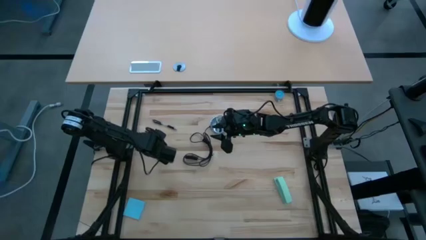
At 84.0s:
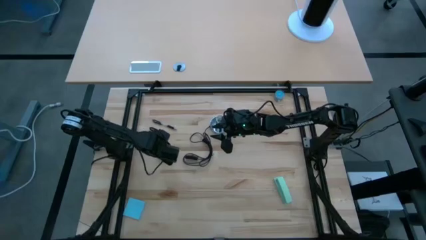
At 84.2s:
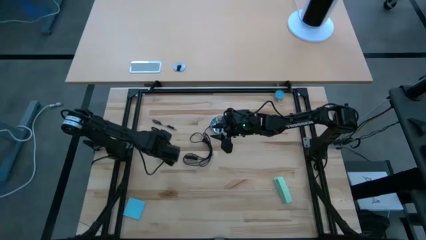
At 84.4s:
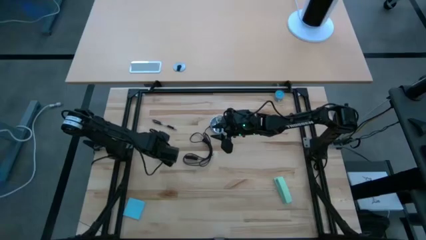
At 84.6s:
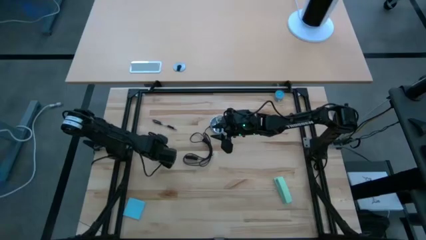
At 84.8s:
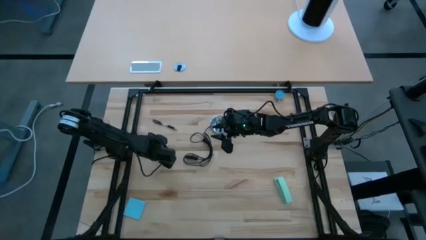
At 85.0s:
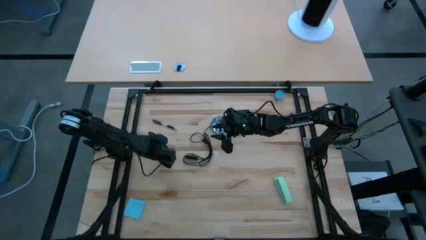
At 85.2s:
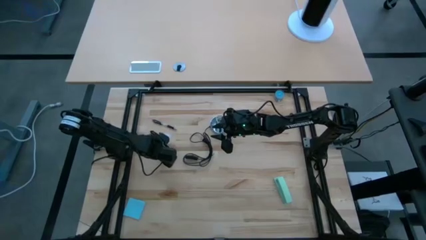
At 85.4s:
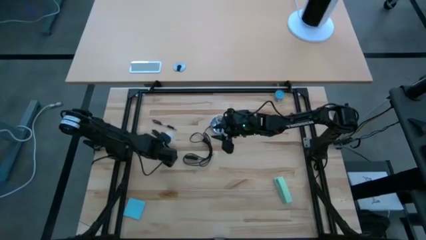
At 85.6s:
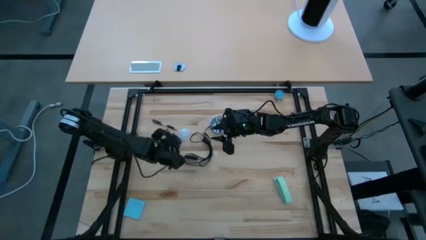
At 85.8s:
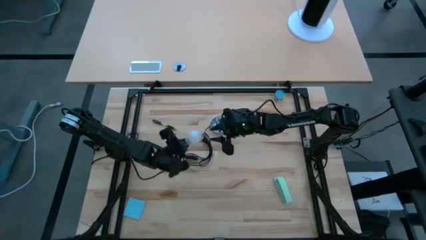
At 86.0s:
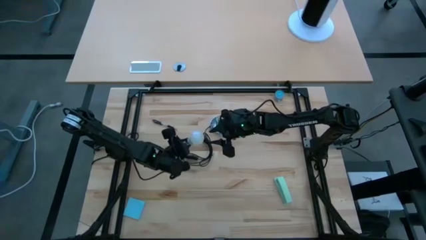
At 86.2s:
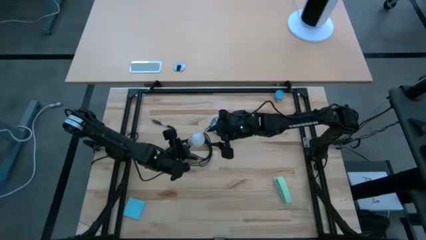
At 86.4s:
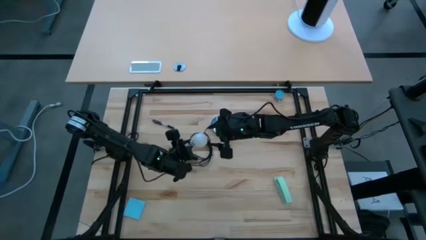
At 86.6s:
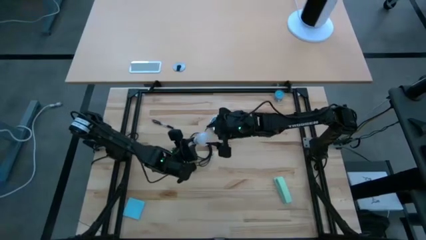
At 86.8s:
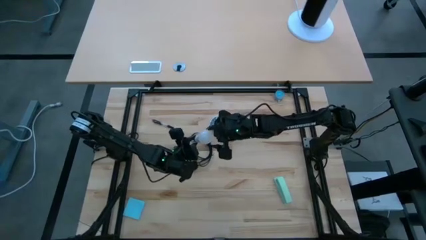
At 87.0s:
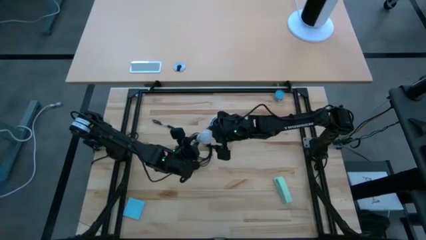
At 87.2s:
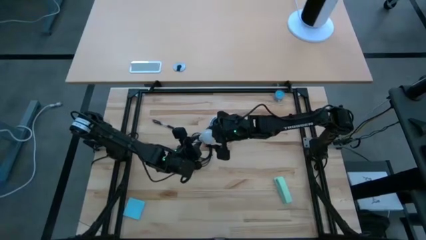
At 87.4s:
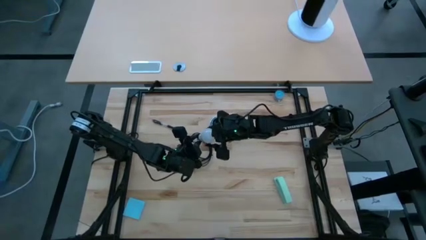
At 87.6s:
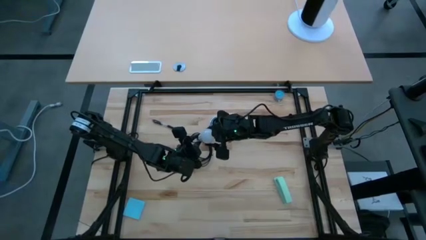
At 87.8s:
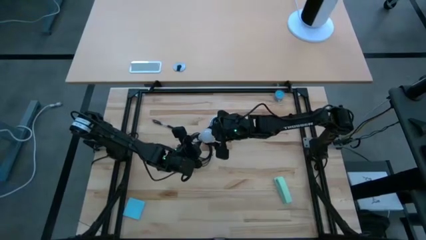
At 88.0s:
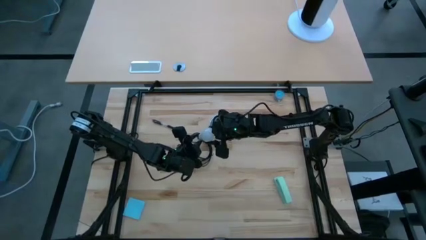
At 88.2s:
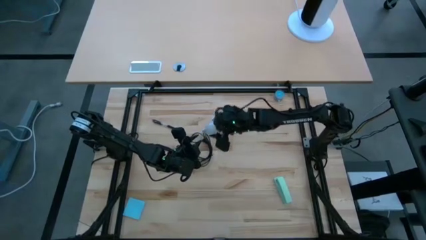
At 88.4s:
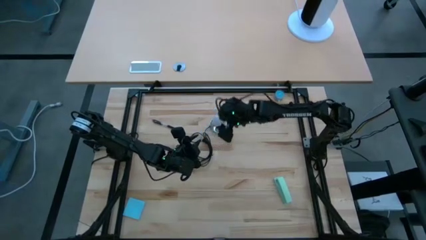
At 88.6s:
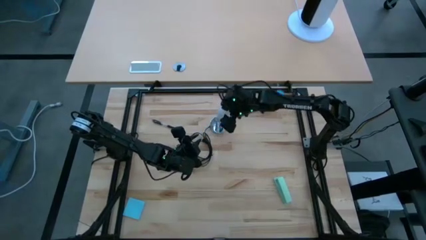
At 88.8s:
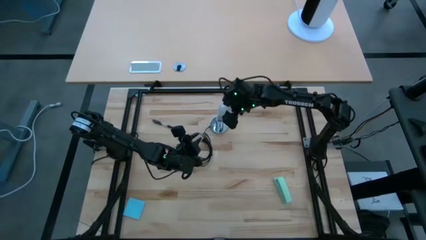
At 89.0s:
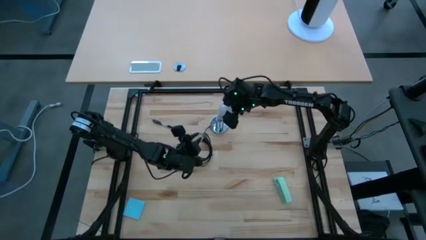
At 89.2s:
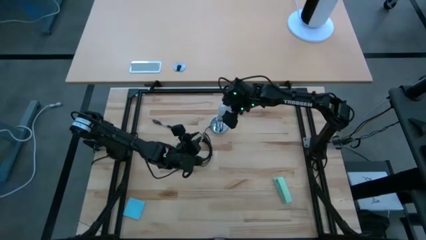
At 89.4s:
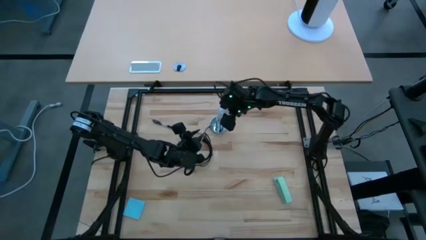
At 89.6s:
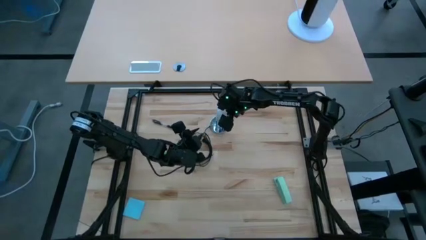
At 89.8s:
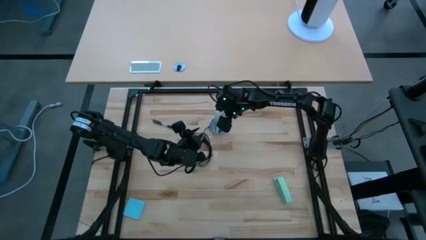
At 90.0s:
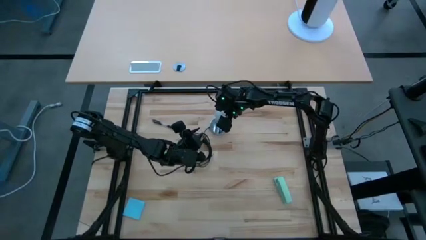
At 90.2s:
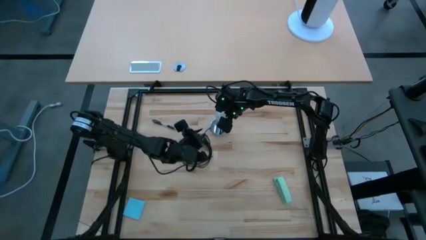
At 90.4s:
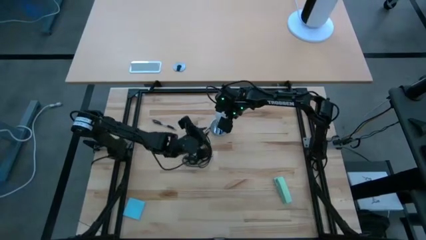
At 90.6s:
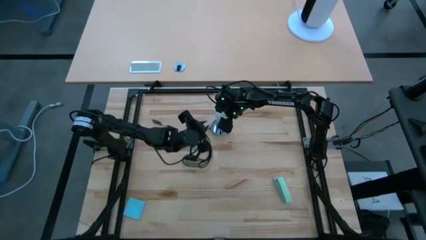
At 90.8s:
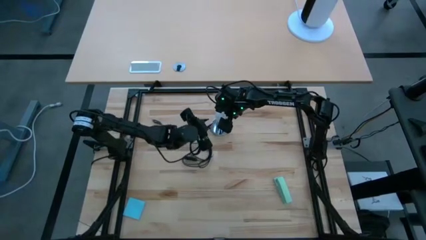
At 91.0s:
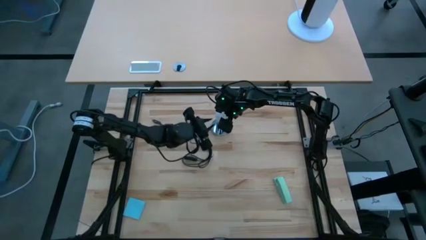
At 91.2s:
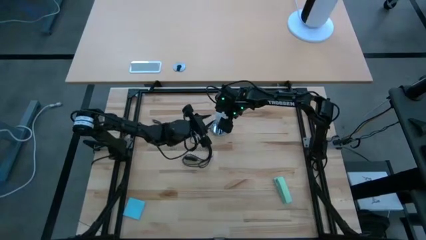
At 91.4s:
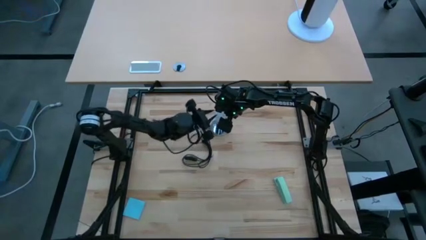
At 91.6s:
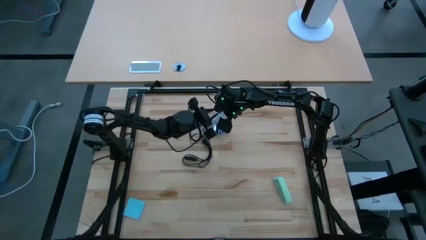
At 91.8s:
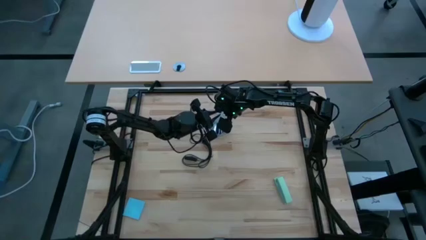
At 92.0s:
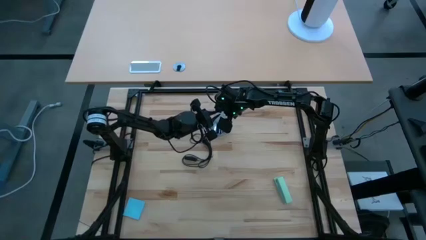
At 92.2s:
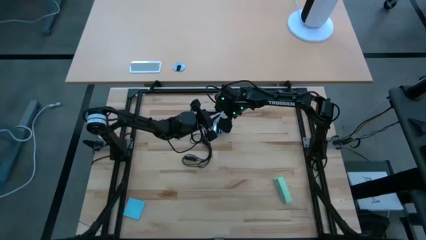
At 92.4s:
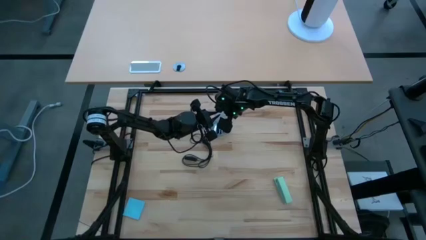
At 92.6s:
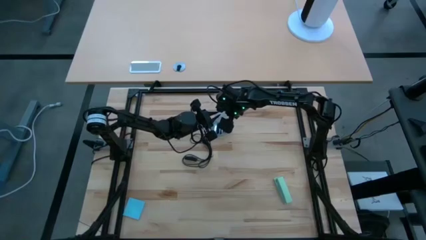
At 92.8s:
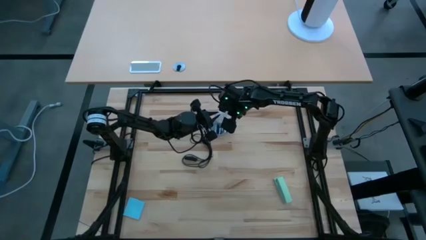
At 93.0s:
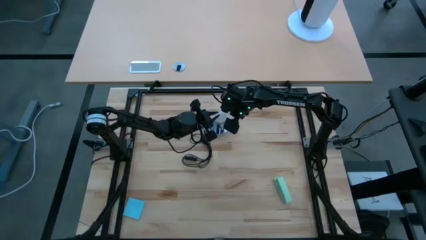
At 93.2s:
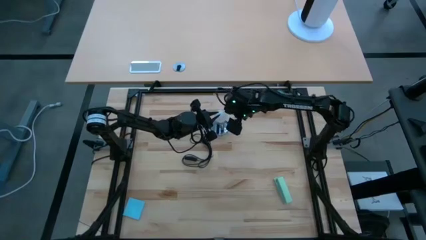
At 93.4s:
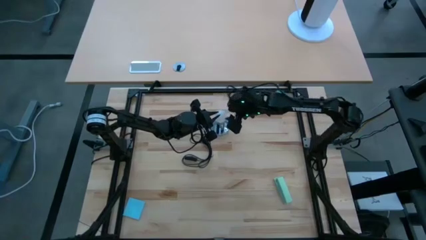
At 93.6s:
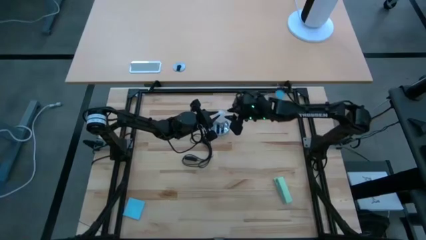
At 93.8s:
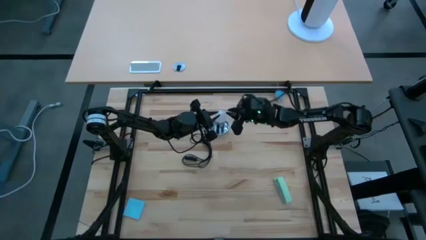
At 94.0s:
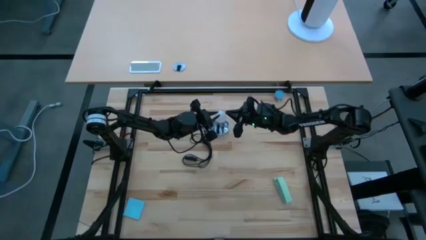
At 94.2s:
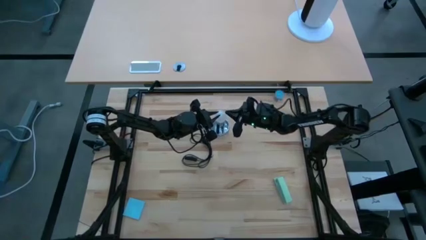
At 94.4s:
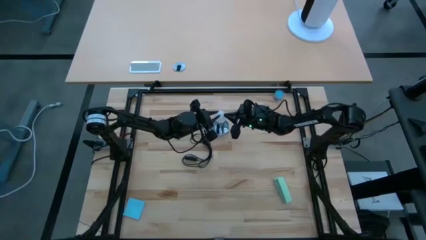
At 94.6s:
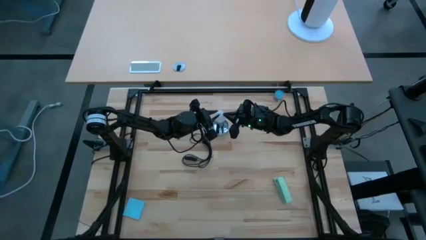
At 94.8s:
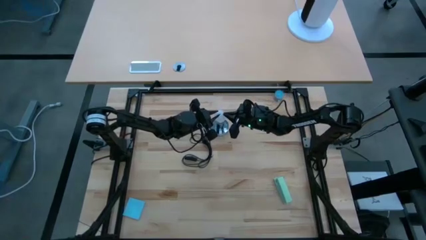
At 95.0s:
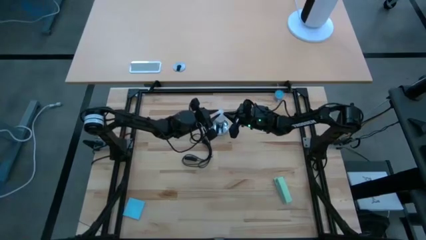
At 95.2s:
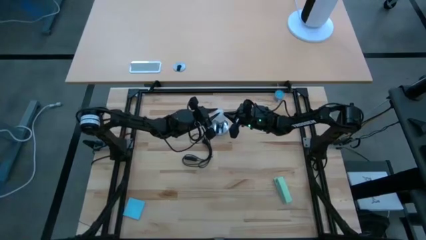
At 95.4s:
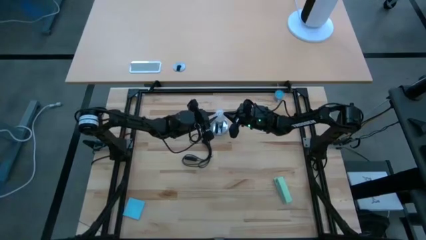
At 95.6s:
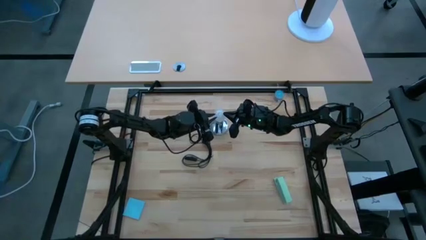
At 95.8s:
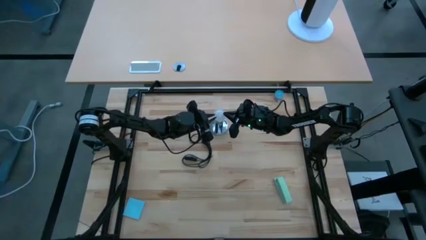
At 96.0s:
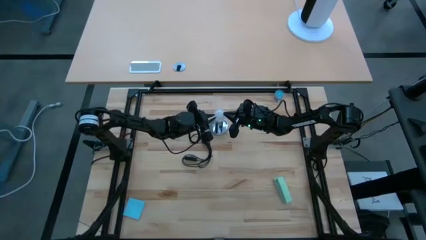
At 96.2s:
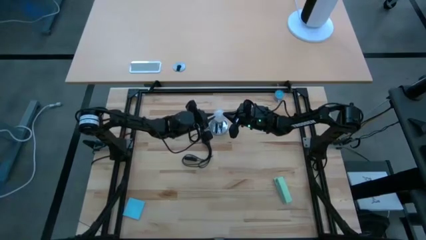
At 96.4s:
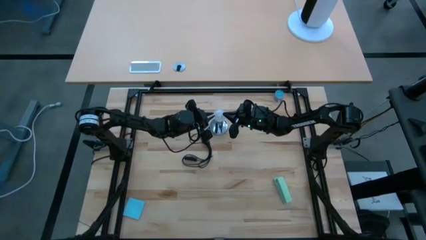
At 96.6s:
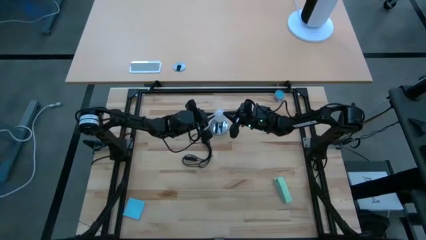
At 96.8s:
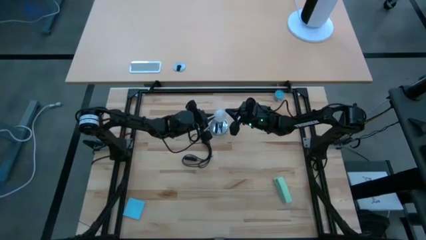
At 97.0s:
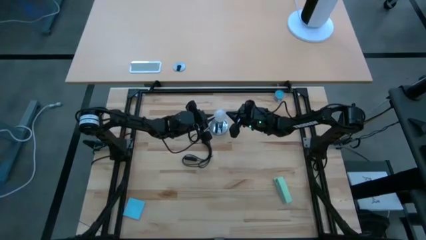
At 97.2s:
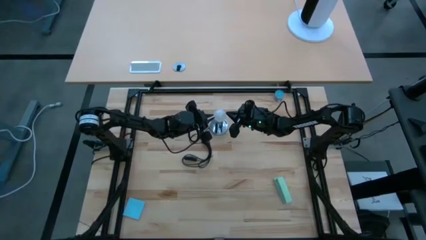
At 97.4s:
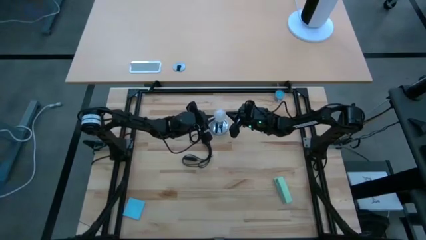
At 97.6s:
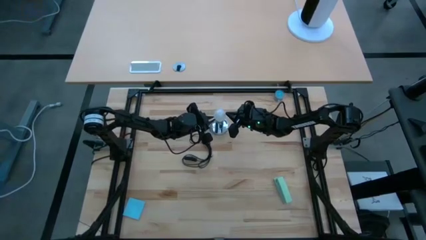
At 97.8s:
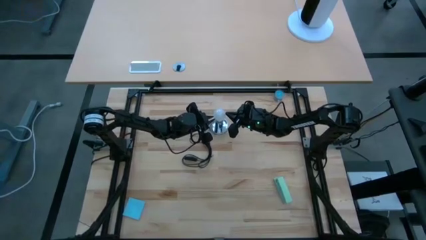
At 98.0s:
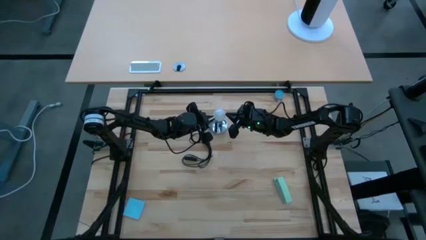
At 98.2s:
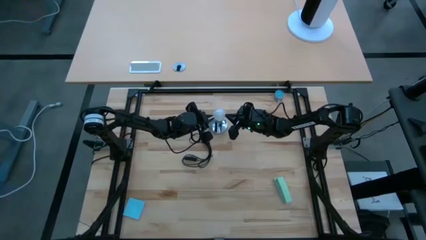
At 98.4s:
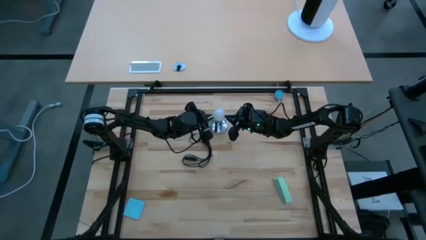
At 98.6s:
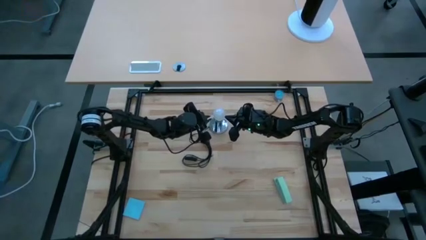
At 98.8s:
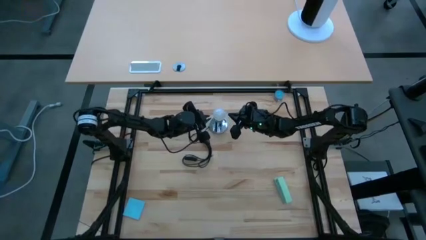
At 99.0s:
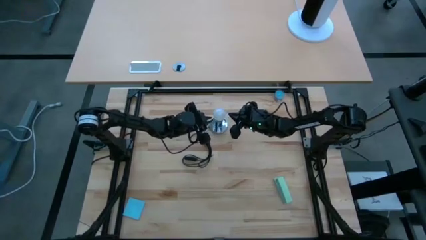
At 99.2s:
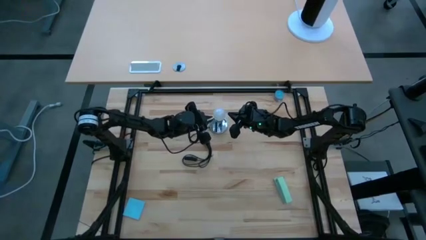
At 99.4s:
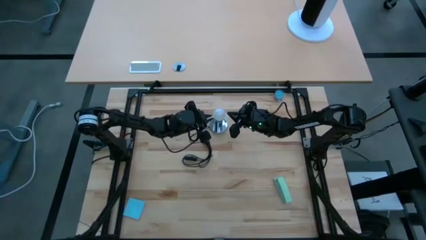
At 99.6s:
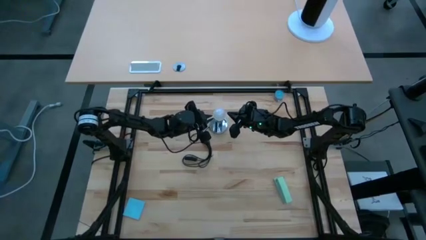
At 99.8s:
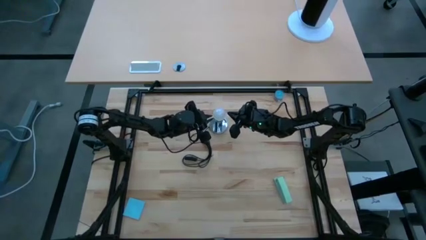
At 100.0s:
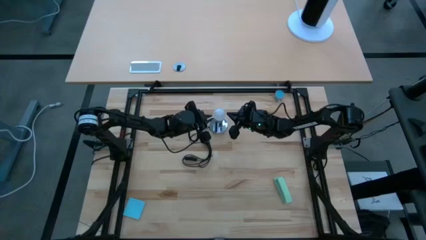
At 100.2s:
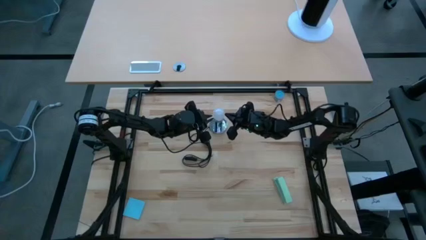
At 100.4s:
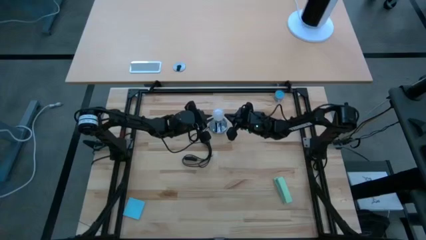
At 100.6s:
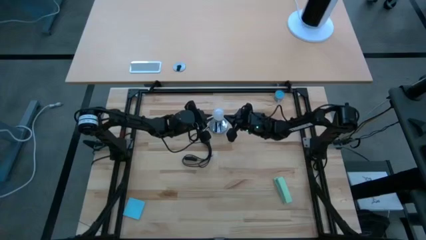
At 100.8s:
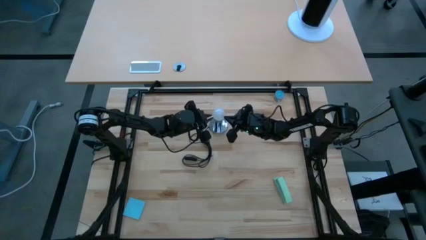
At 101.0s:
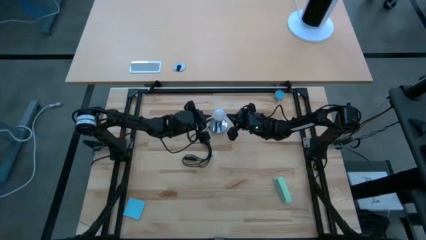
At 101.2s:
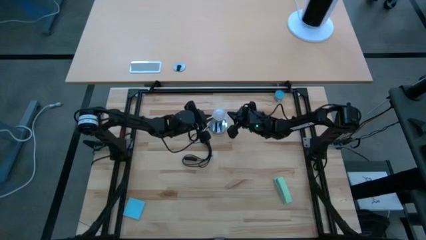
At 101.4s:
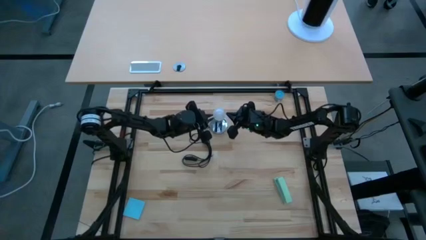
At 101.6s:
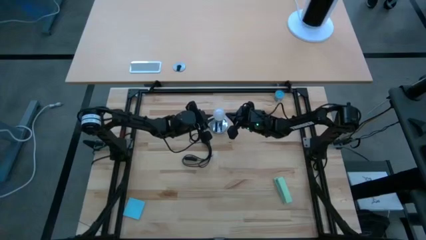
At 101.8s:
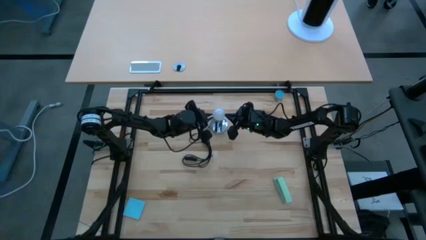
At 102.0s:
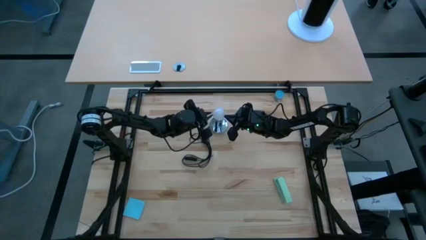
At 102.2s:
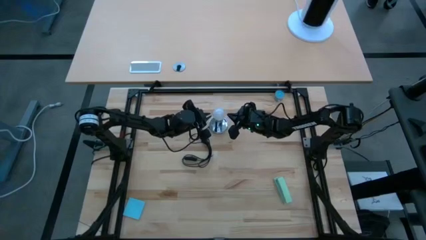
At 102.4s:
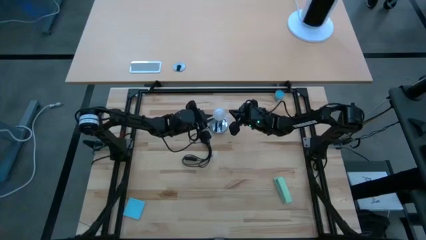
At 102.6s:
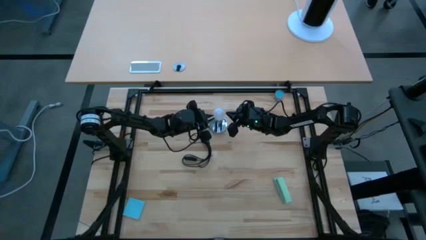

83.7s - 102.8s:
Task: Screw lightbulb
Insert the lightbulb into the lamp
